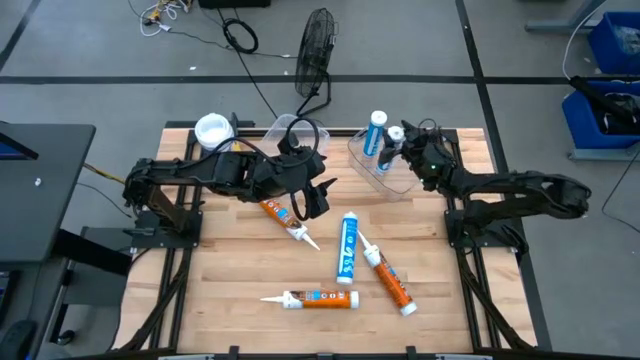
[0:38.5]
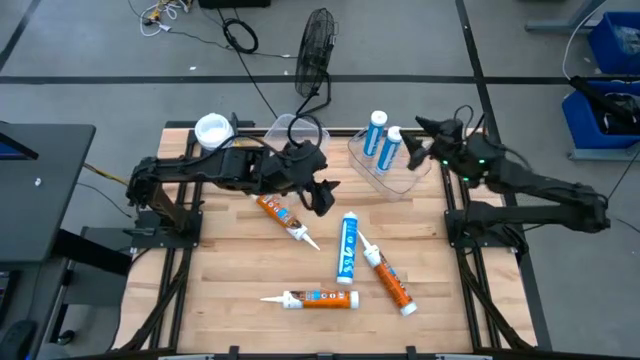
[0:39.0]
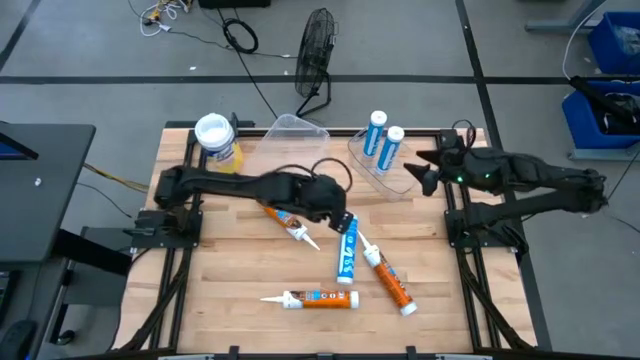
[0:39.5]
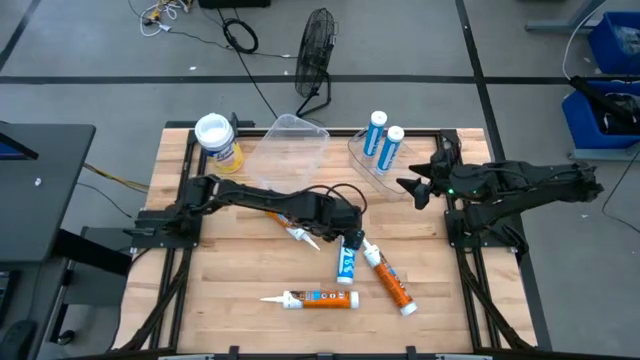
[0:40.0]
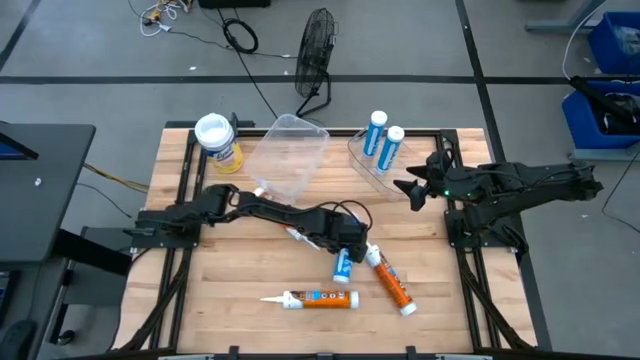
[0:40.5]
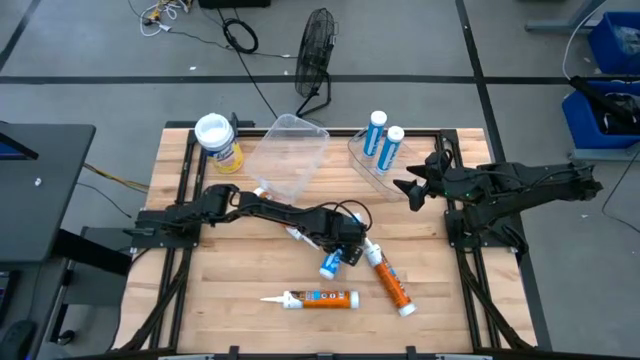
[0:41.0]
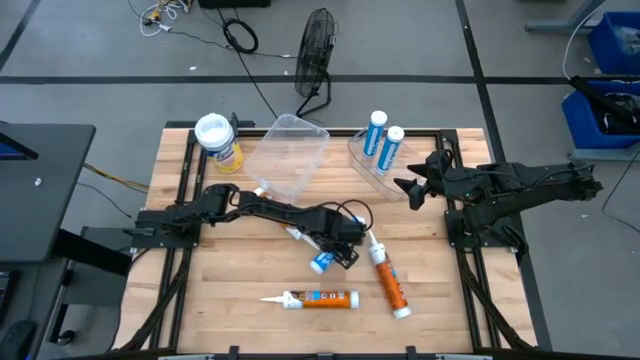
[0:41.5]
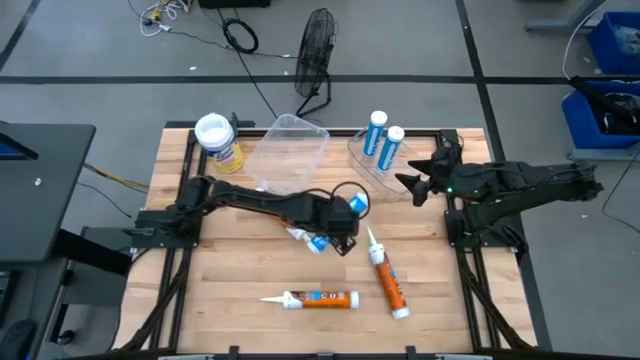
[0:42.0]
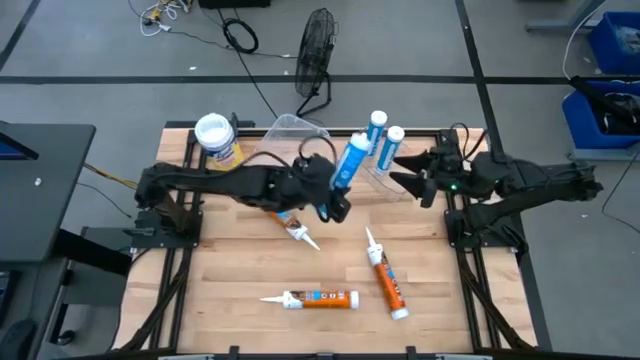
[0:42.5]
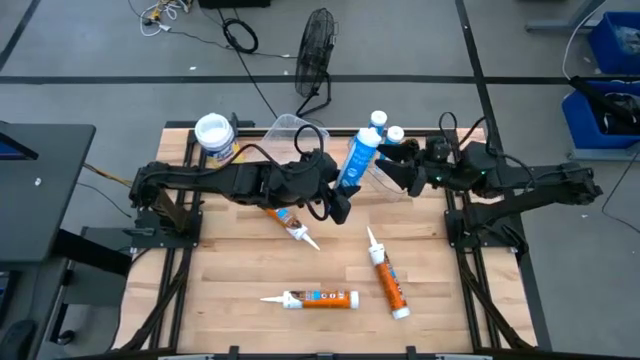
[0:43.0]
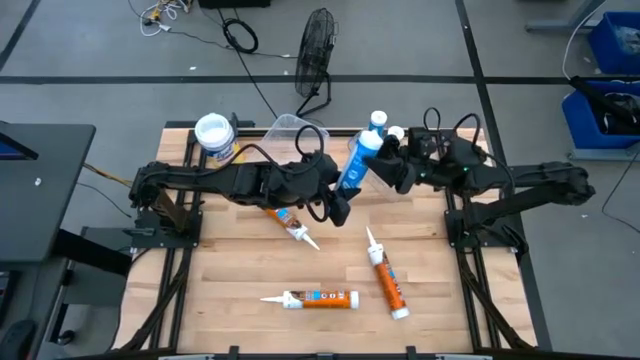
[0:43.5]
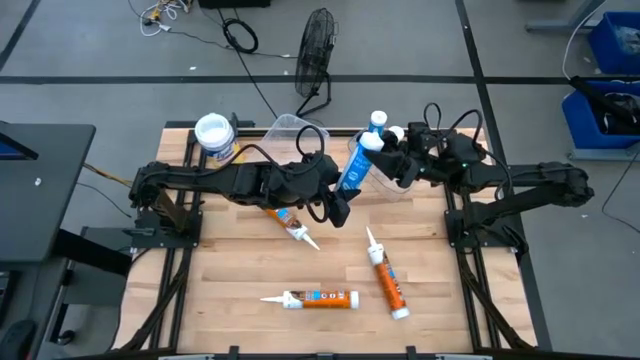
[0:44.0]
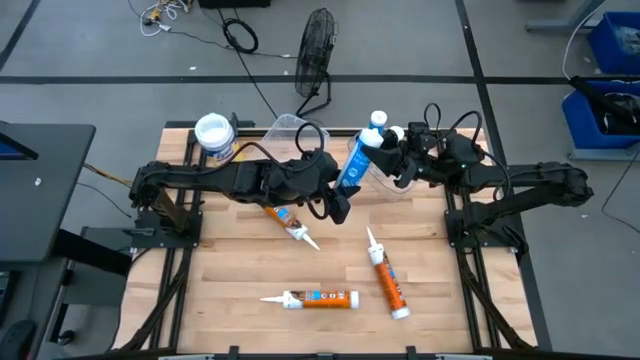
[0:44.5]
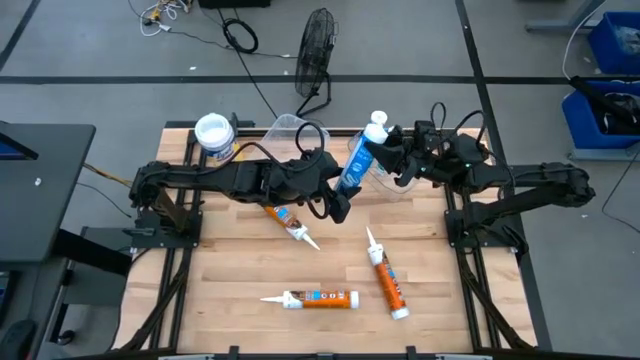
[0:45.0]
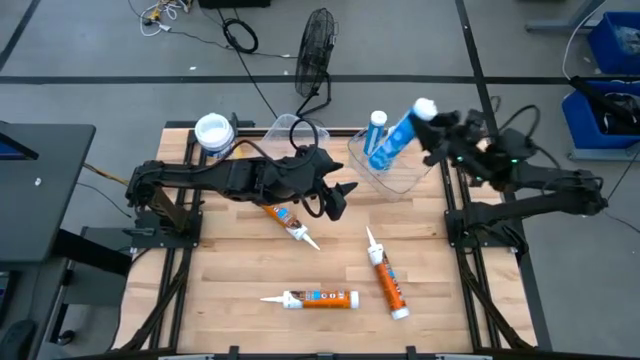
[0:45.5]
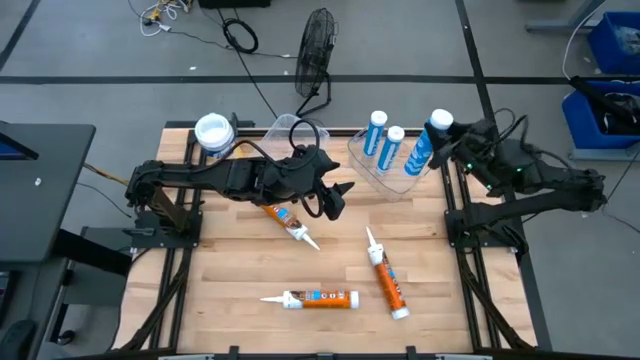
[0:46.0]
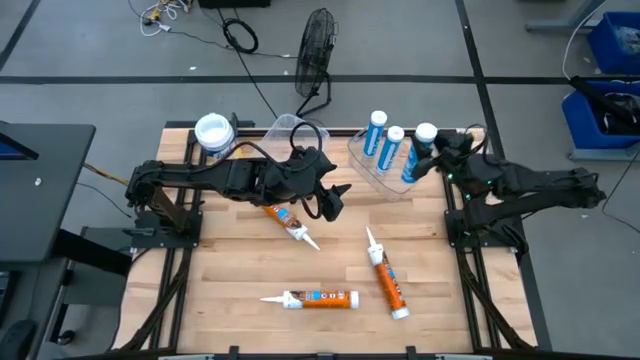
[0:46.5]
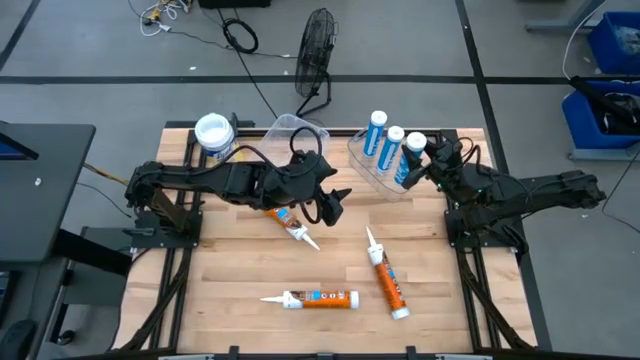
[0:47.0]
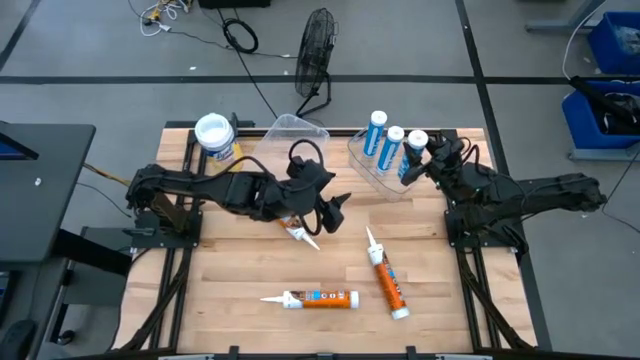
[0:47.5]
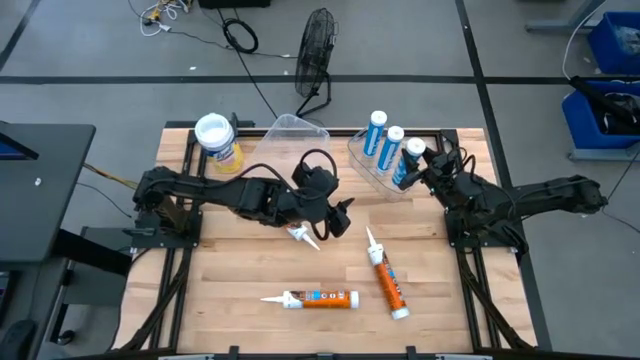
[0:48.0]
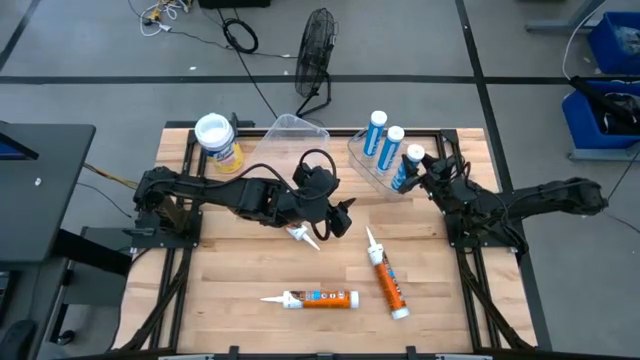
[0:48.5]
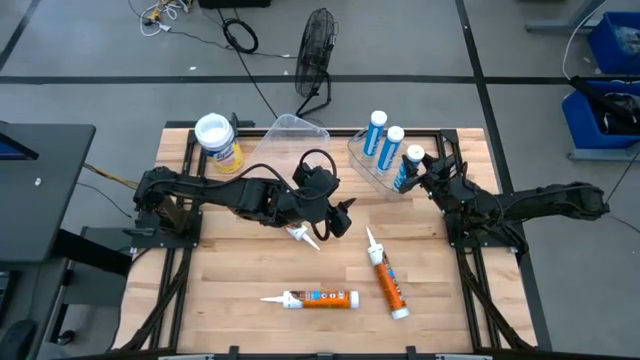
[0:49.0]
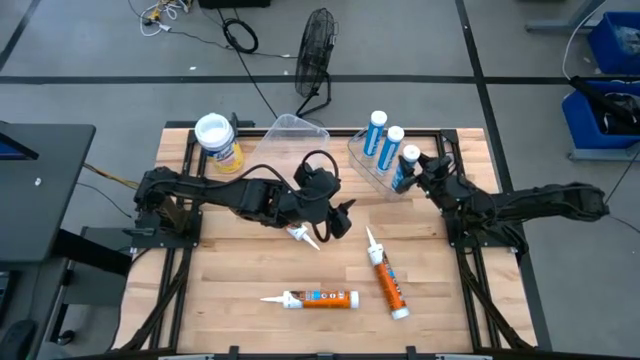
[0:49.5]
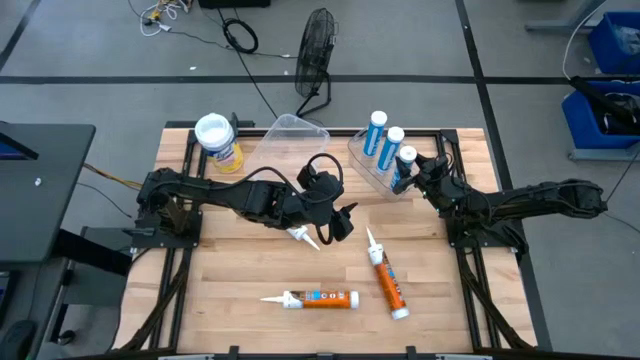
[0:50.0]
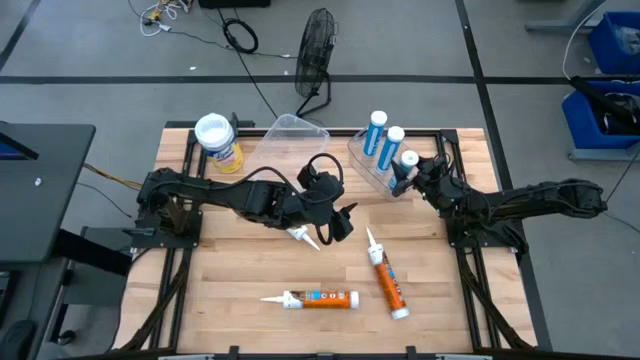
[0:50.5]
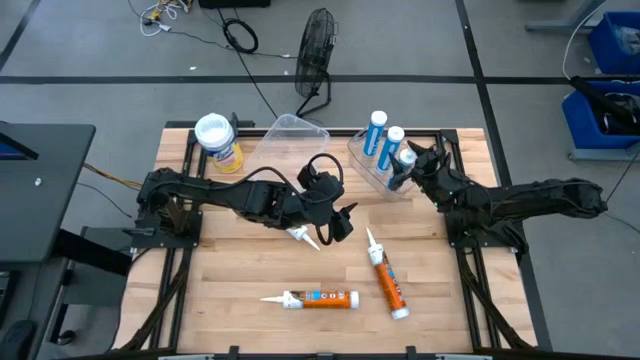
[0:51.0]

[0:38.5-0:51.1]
Task: Pick & place silicon tubes, Sealant and Lysol wipes
Put the blue sealant into the right transparent bin

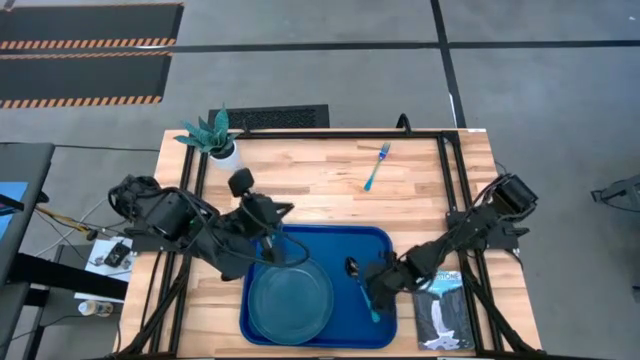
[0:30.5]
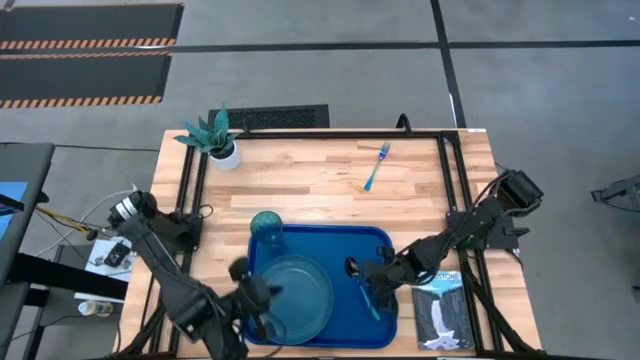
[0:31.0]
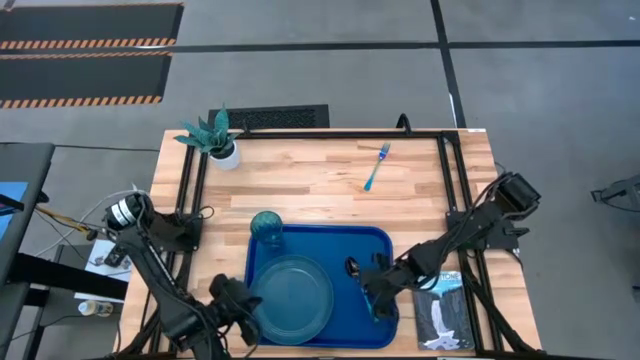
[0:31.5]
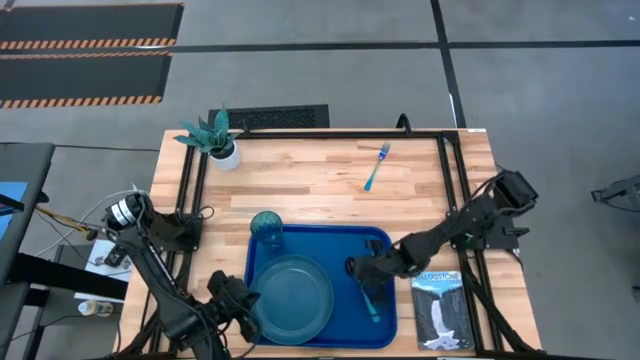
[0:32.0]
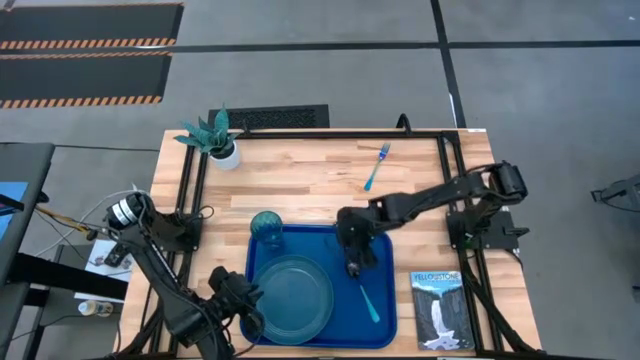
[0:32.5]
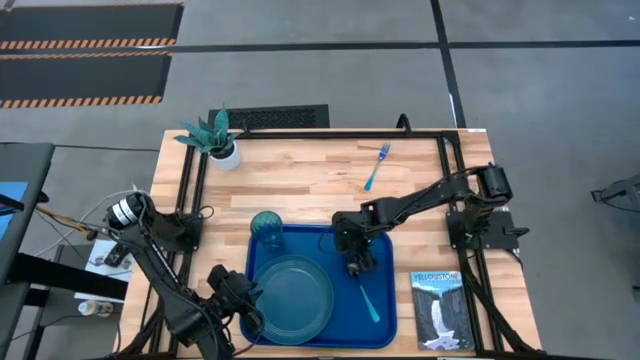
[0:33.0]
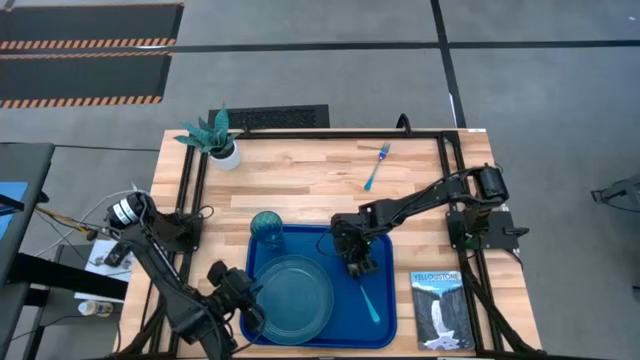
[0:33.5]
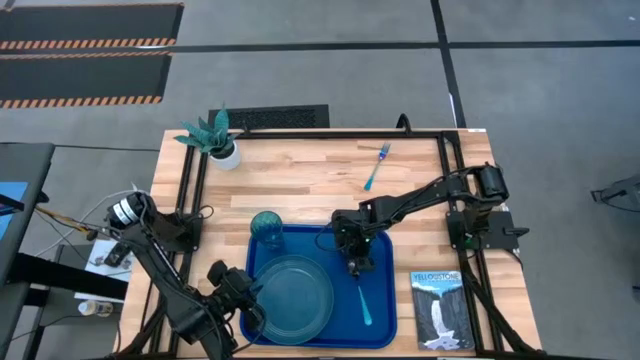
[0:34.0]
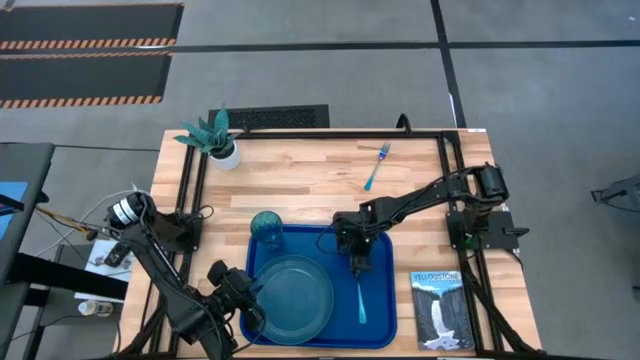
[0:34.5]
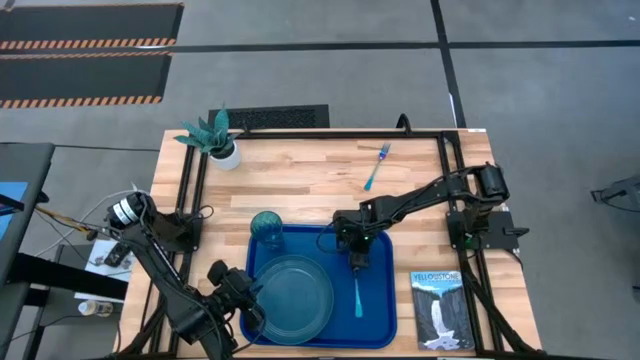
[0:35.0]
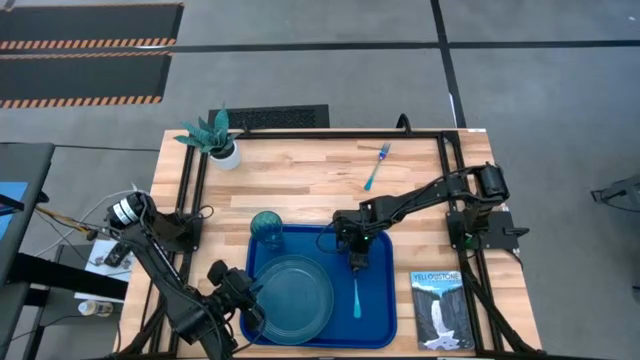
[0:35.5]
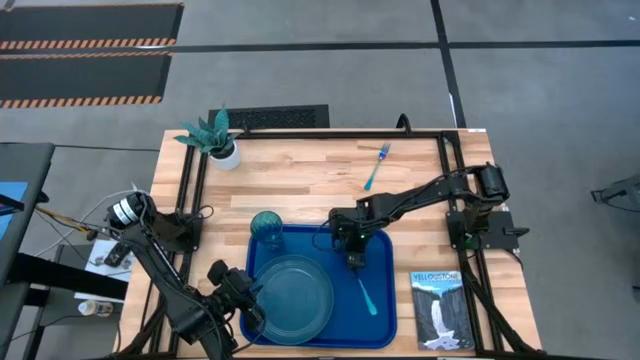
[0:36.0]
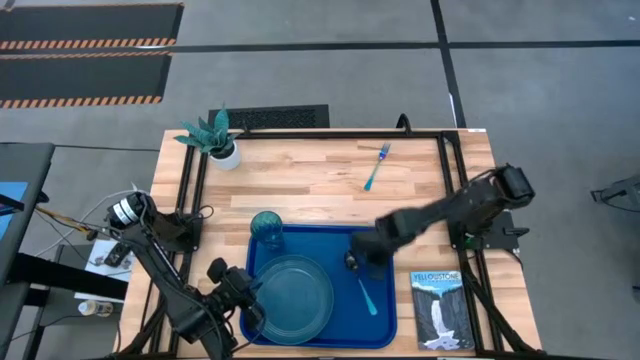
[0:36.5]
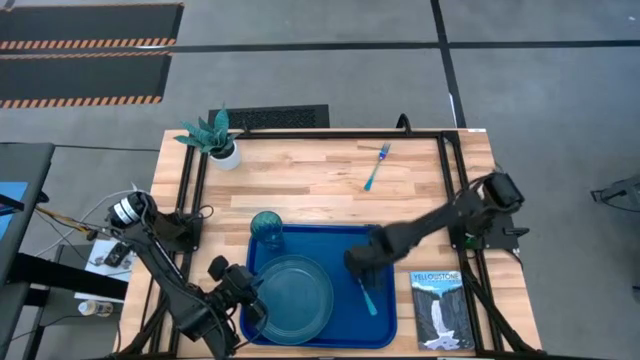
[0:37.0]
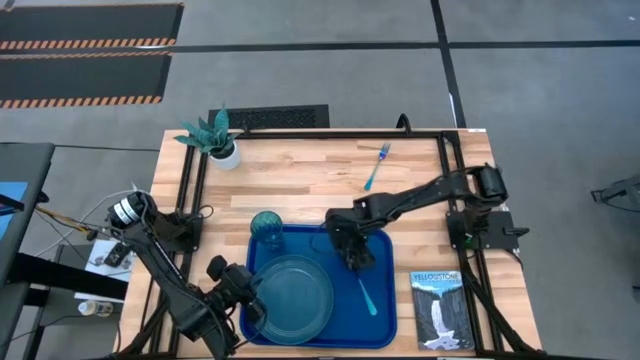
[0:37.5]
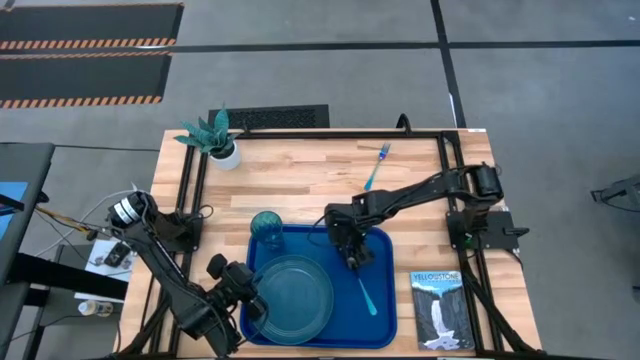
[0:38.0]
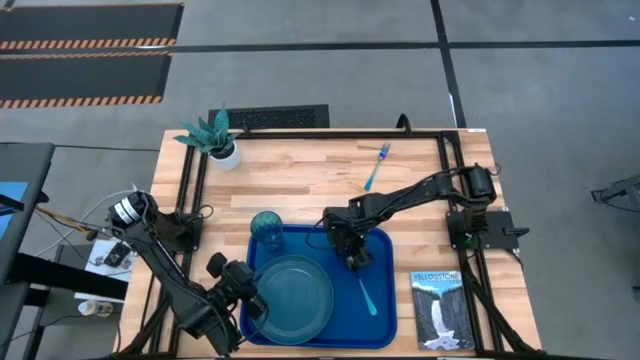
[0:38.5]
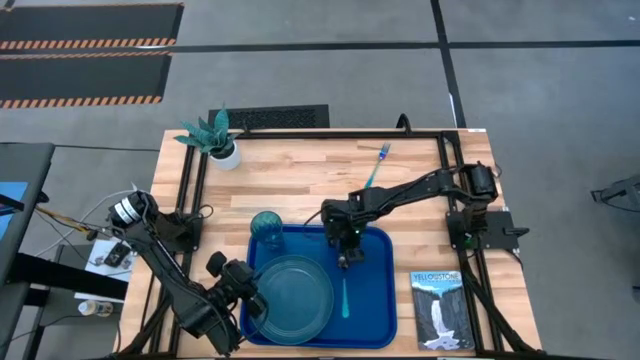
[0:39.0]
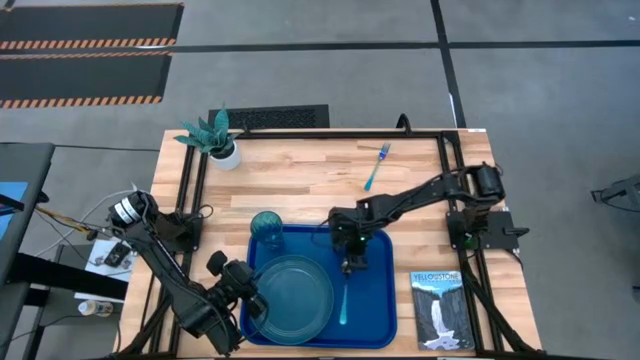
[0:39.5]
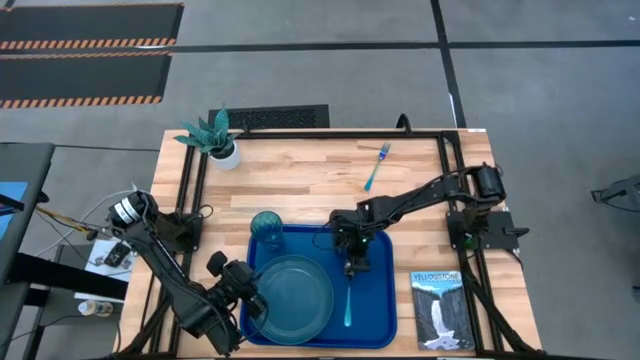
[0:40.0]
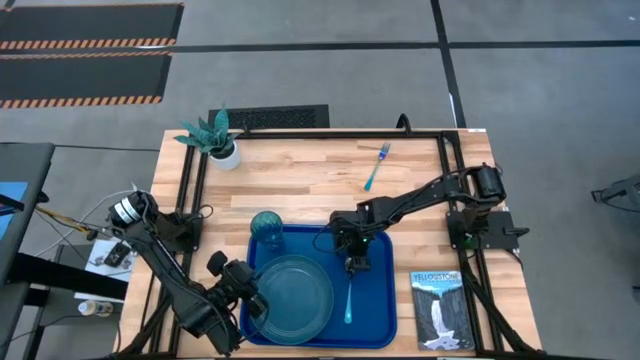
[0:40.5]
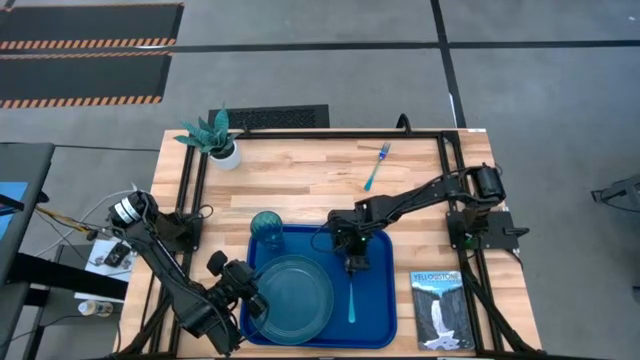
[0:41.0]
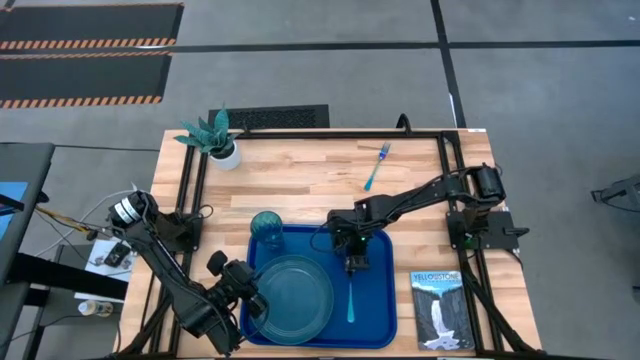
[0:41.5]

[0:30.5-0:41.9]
Task: Pick and place plate/cup/fork/spoon on tray
Adjust the blue spoon on the blue serving tray
